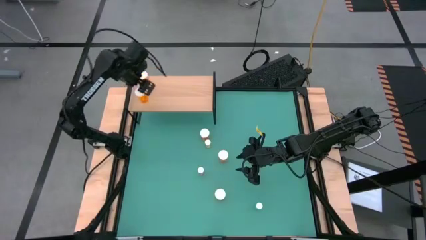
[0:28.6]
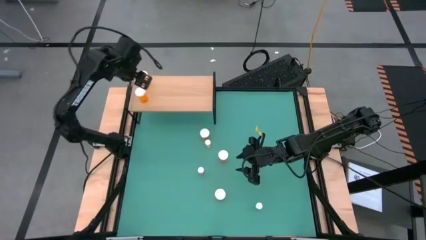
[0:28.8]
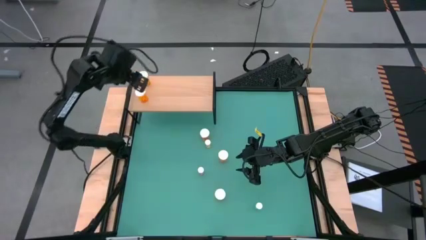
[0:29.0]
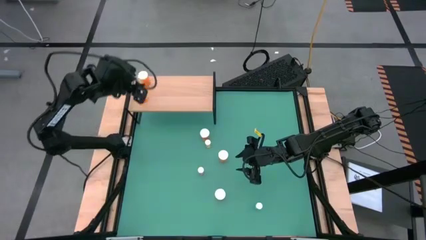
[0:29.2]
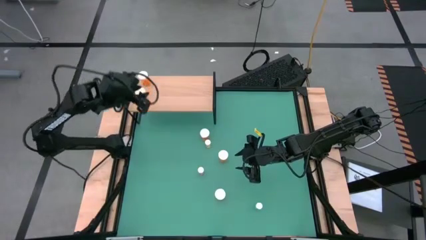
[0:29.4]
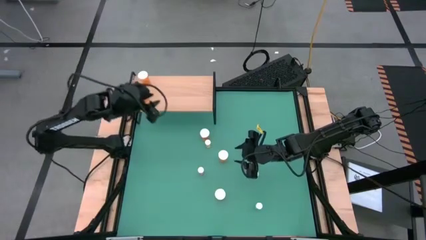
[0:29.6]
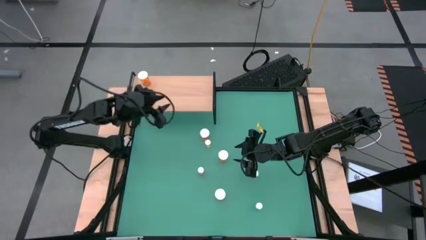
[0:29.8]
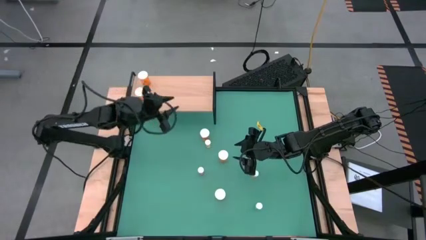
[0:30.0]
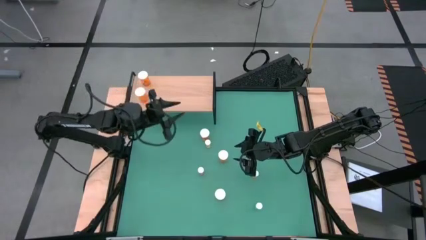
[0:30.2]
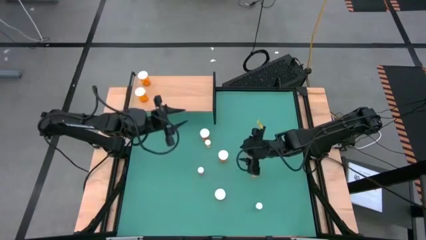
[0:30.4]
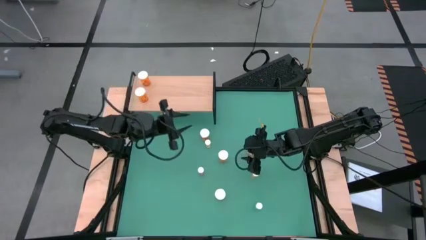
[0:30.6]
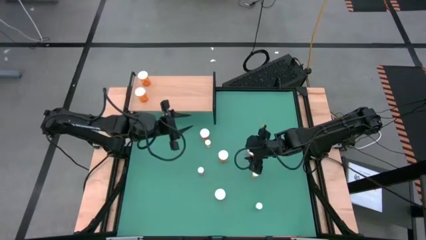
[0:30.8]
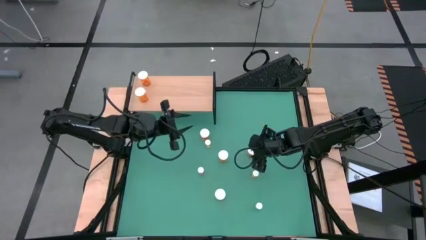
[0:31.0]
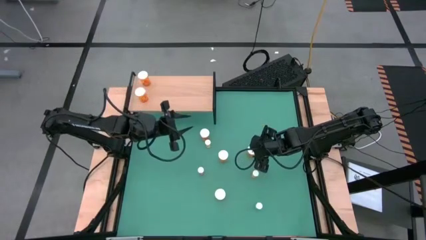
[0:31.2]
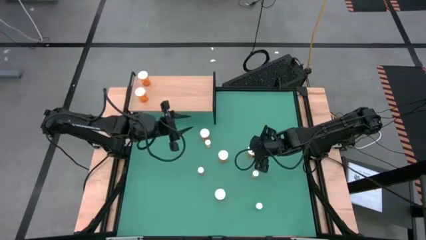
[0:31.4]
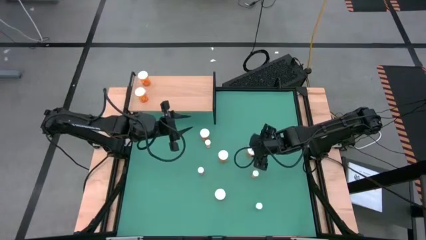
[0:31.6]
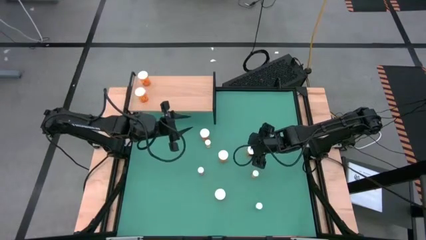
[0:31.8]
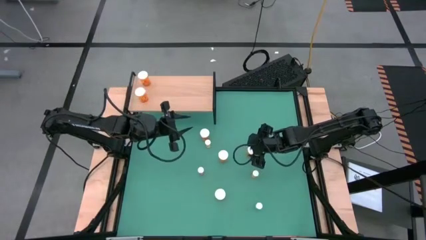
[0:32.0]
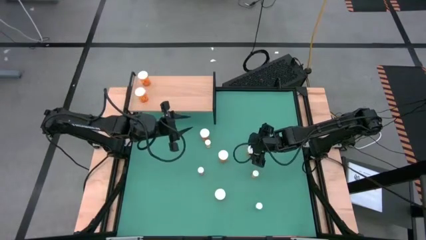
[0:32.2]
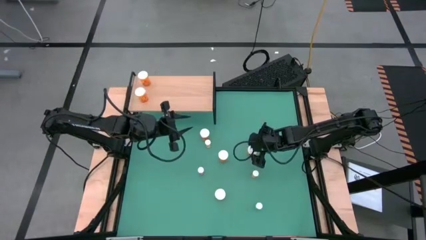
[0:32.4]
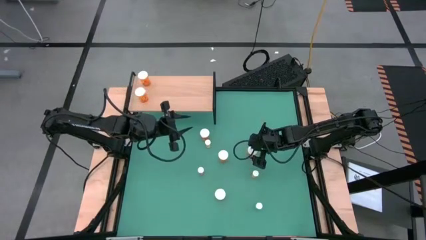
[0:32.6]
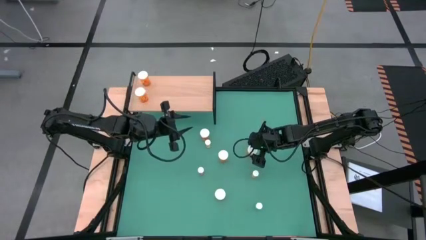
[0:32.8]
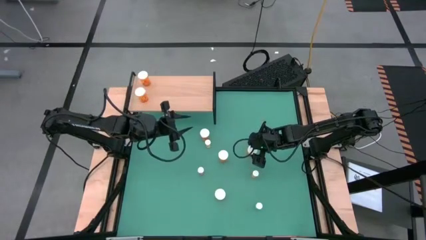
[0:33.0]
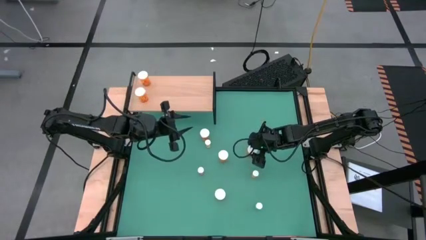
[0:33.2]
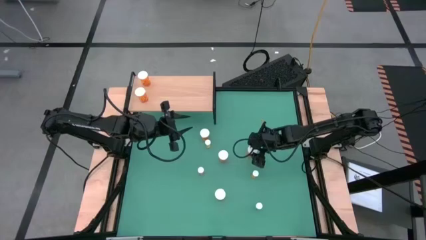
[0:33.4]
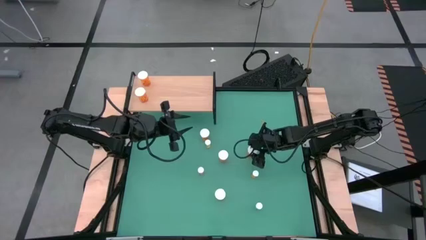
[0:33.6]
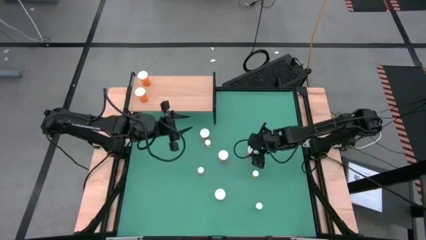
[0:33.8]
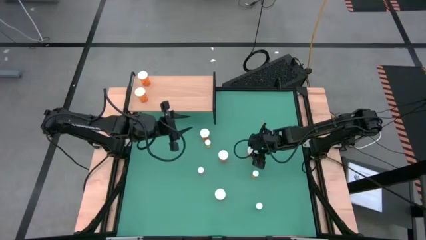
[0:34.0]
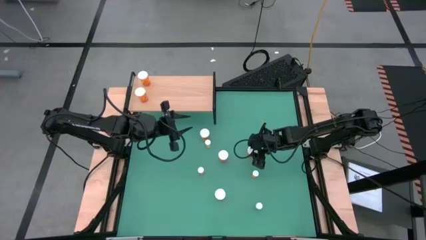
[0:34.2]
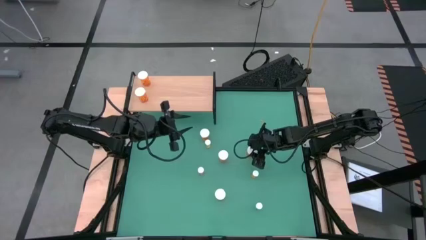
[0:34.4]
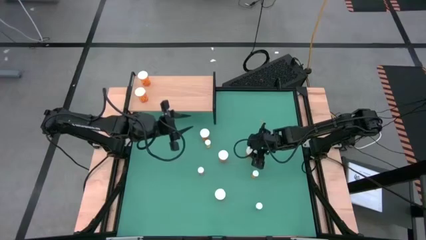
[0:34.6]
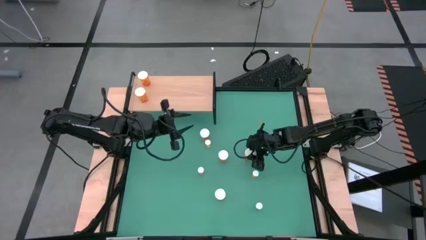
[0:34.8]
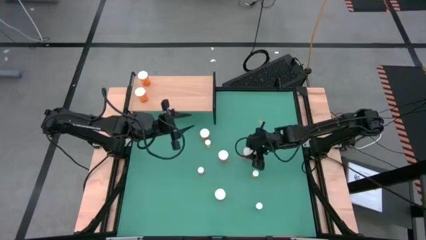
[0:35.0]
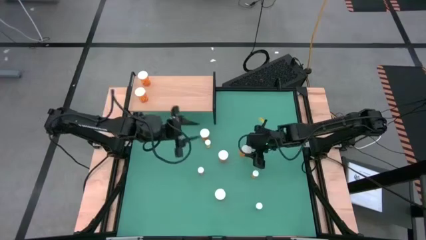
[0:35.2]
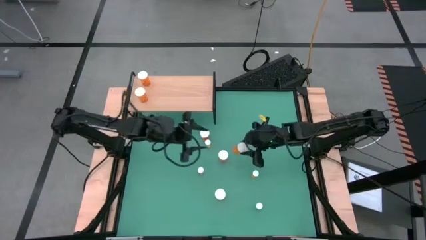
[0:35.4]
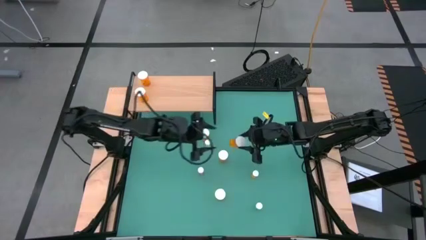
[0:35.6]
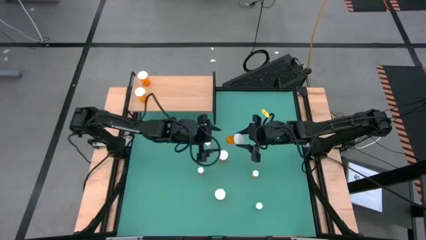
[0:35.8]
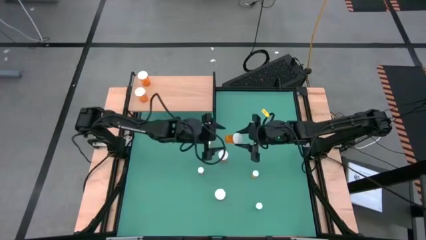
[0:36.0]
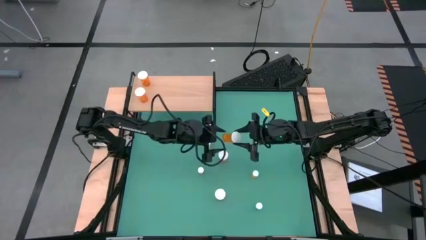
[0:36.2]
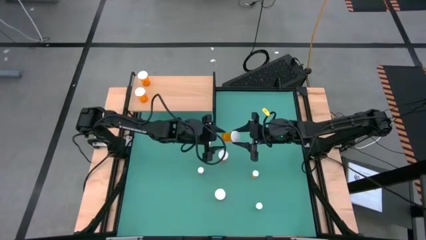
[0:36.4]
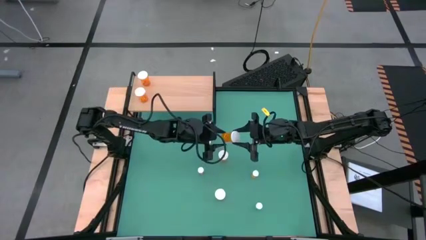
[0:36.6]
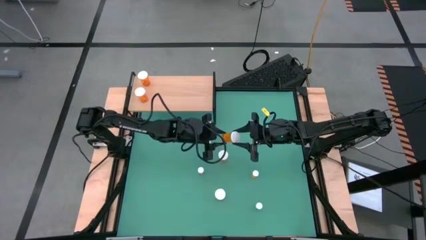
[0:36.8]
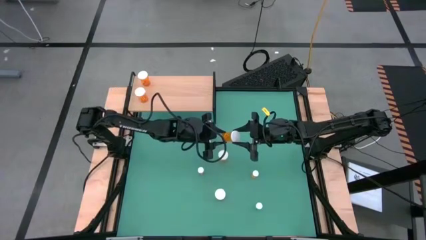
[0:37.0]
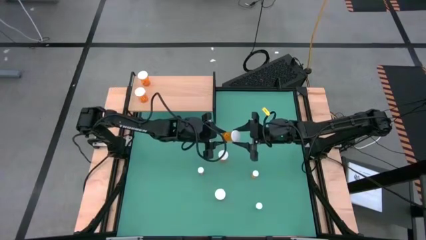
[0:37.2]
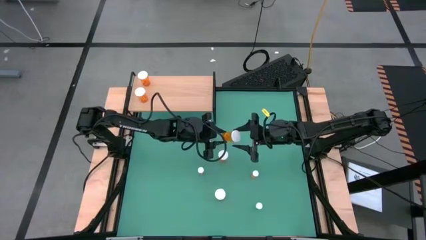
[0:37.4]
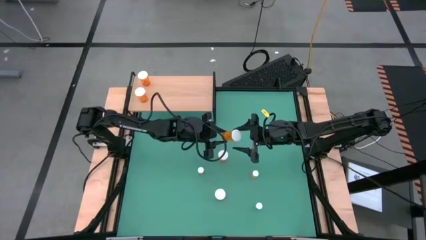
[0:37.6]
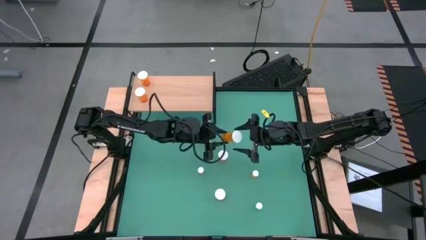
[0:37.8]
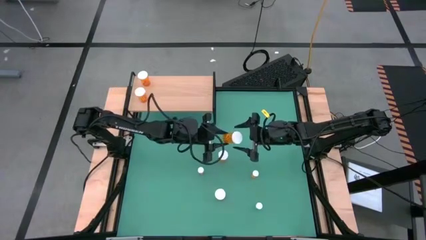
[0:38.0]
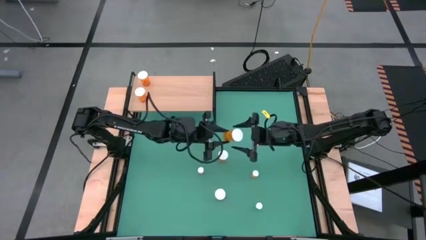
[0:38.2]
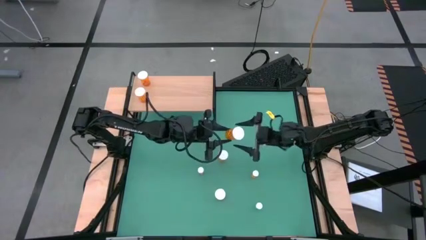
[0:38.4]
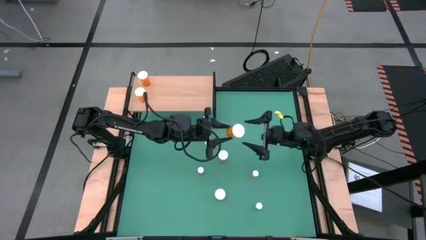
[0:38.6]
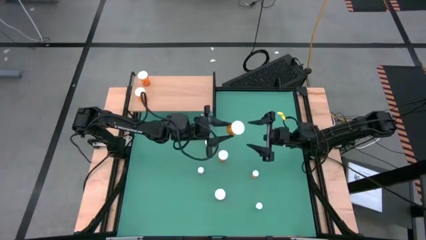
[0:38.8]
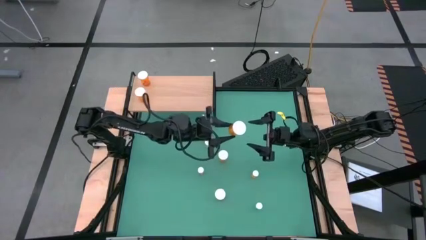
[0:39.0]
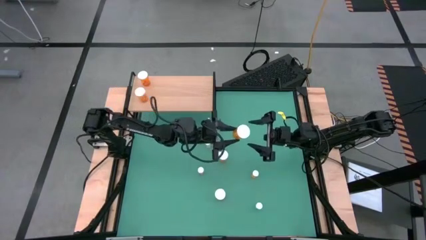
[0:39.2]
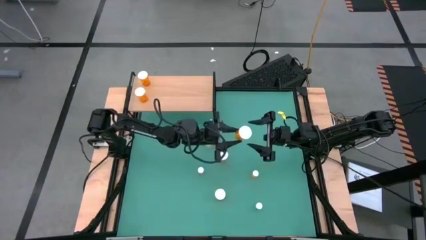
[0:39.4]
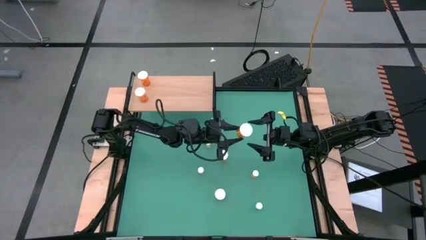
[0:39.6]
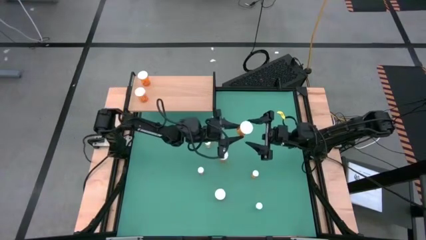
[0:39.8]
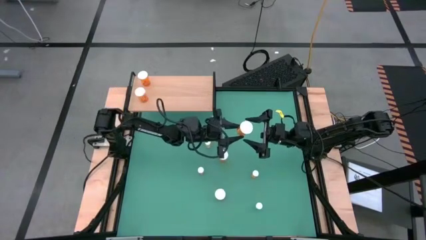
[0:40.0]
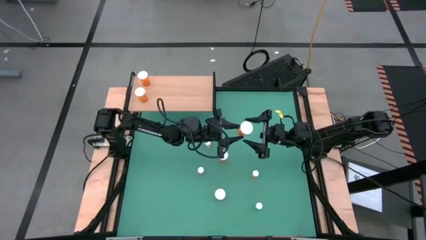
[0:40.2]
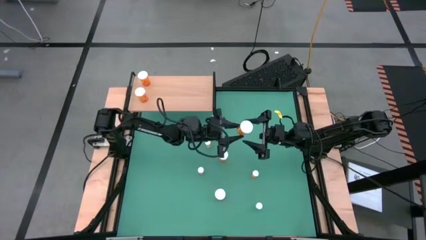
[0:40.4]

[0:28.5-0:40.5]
Task: Pick and place medicine bottles onto shelf by color
Put the big orange pill bottle on the shelf aligned with the other big orange pill bottle
